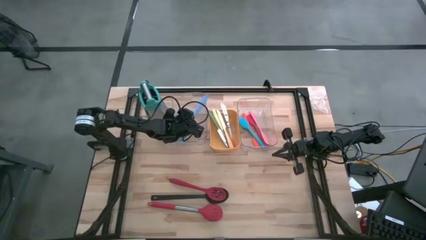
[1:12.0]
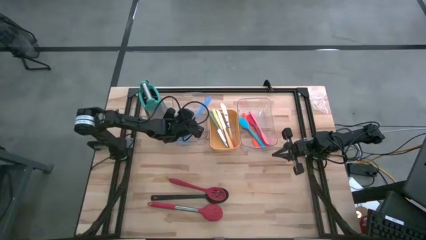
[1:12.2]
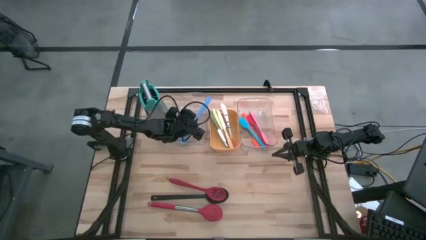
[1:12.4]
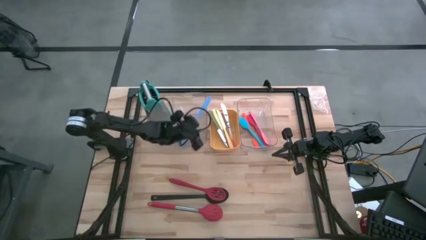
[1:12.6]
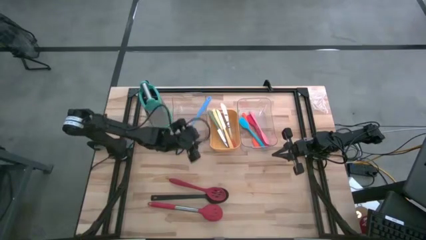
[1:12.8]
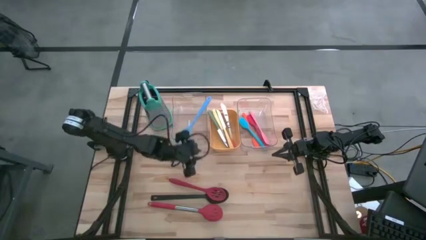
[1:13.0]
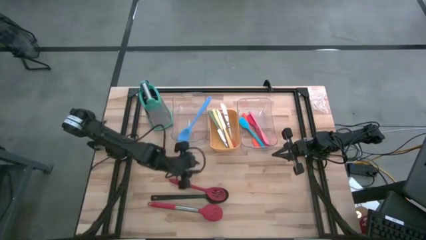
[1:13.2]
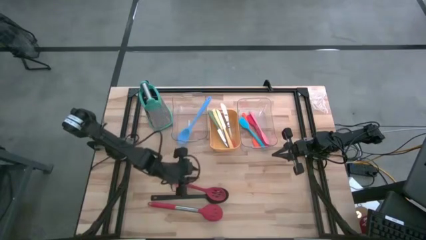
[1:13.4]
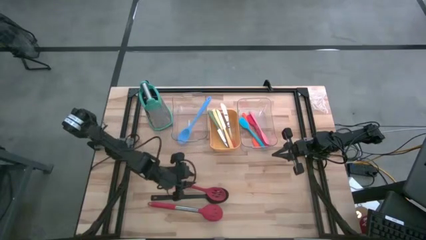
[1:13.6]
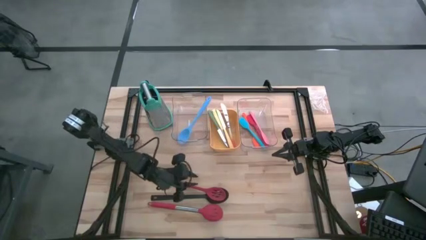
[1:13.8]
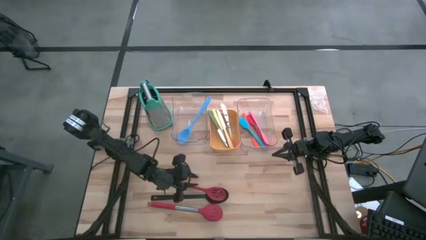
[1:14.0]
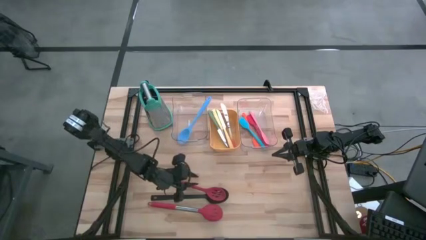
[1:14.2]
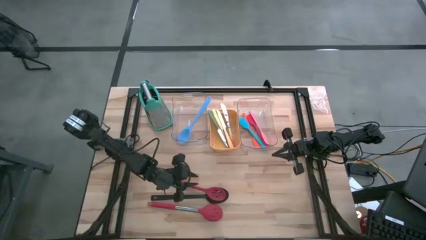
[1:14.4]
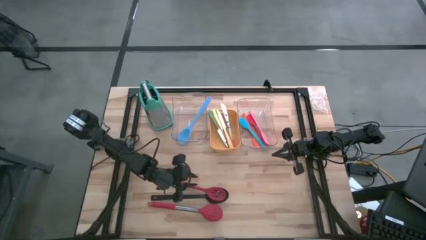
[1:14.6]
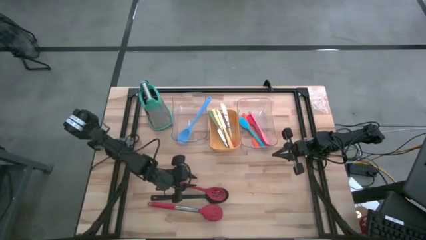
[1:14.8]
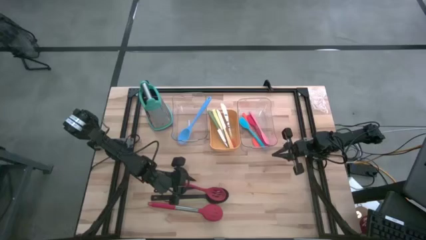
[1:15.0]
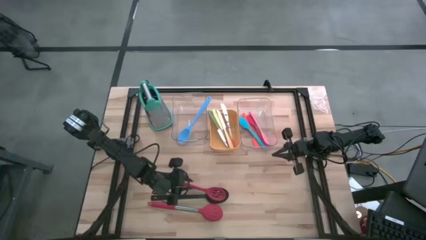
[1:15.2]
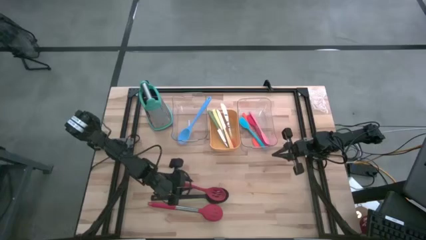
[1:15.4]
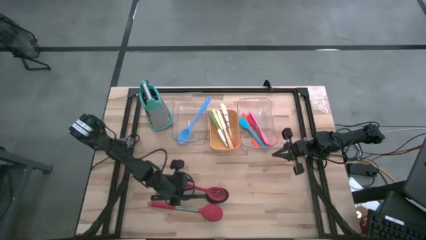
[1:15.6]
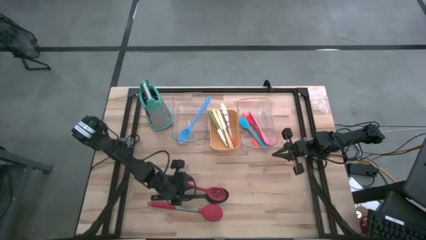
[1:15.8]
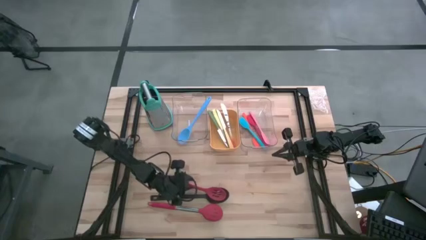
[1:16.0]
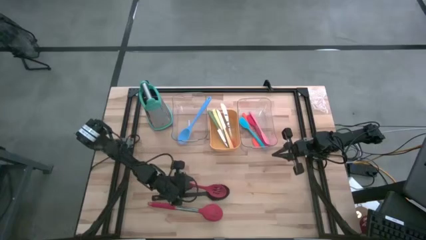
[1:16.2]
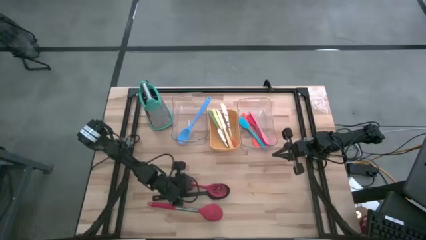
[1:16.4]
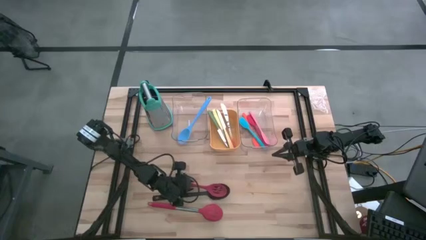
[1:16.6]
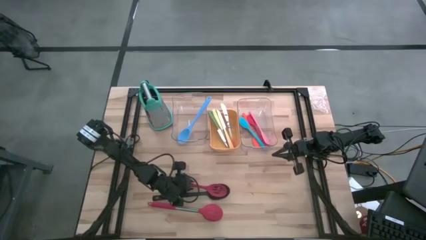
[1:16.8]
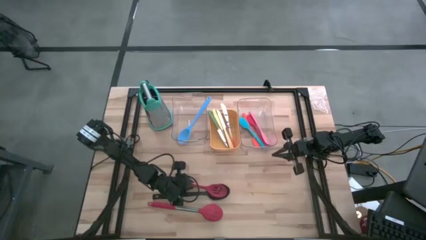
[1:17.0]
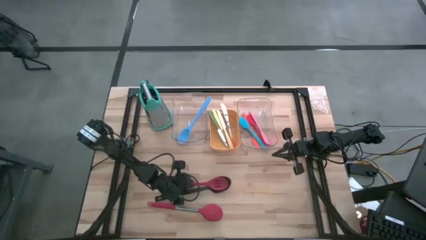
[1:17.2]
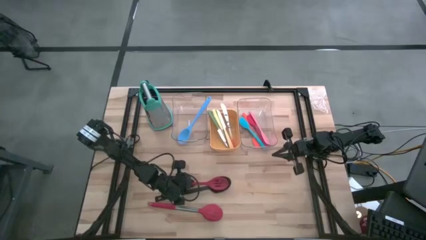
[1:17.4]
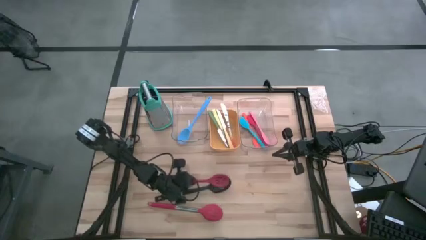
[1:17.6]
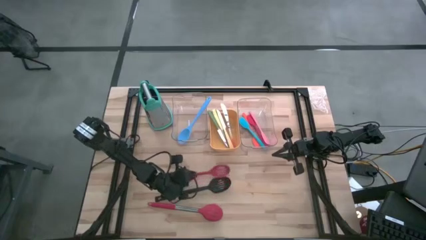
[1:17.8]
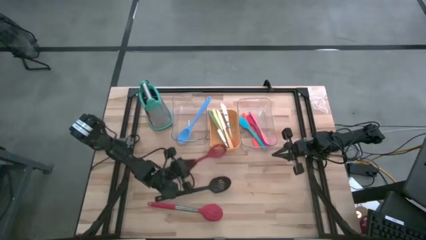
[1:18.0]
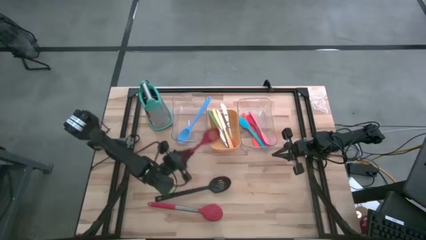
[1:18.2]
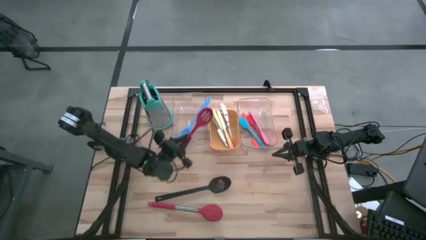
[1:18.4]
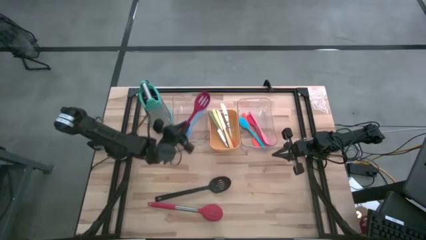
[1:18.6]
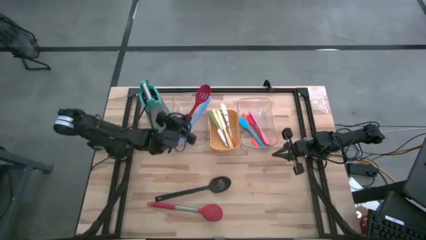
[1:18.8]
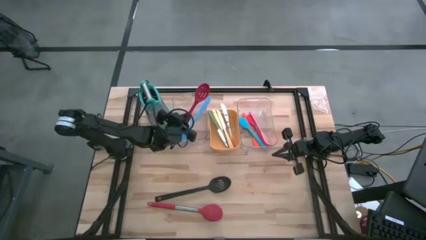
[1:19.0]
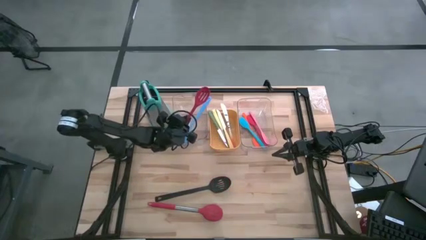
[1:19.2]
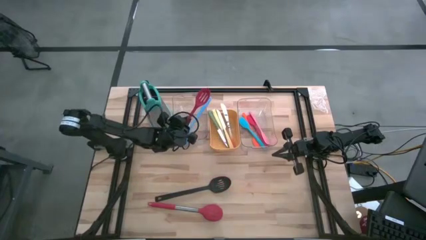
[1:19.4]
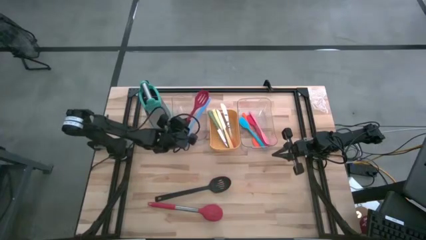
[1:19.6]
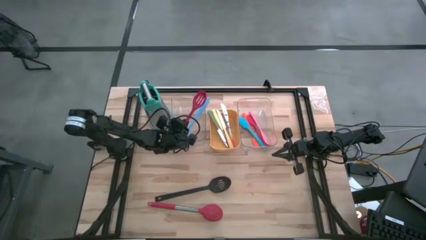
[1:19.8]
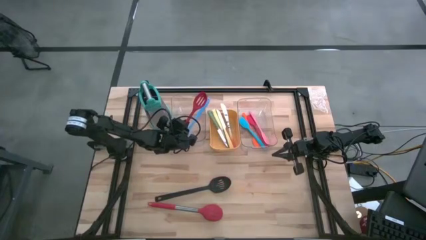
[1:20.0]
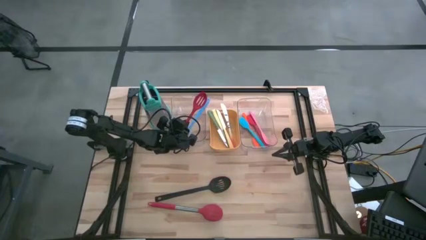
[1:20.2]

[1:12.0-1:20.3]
Task: Pick & Place Kitchen Items
Put the red serving spoon into the left transparent bin

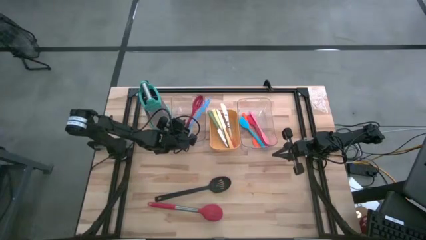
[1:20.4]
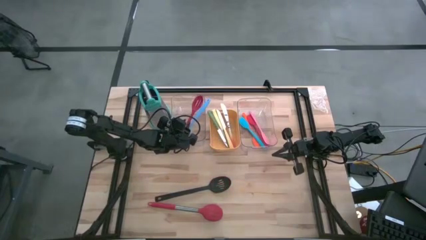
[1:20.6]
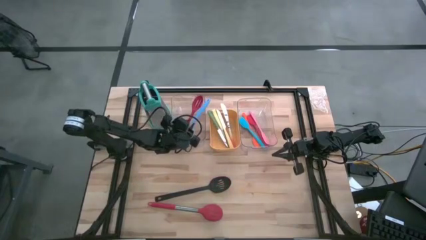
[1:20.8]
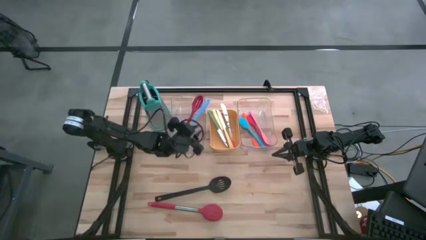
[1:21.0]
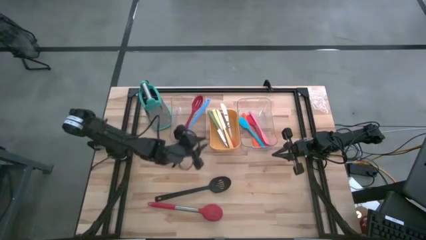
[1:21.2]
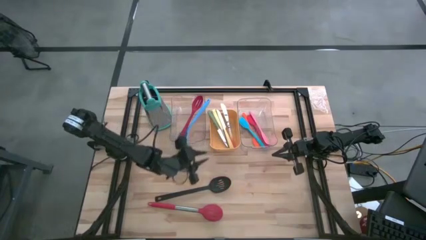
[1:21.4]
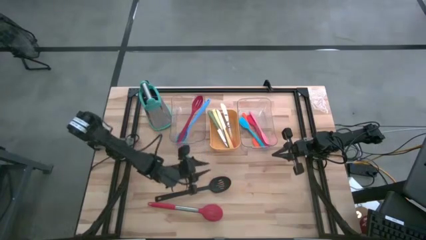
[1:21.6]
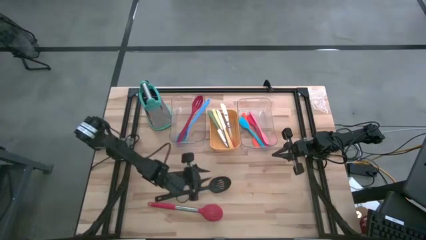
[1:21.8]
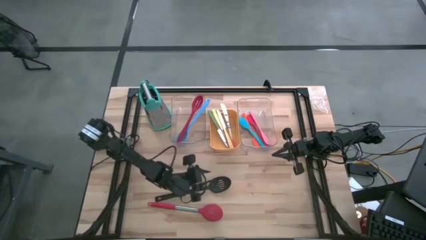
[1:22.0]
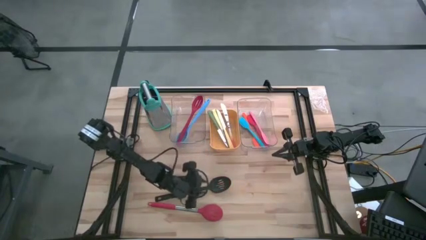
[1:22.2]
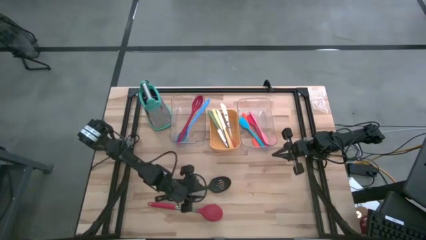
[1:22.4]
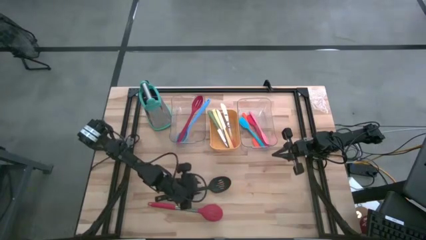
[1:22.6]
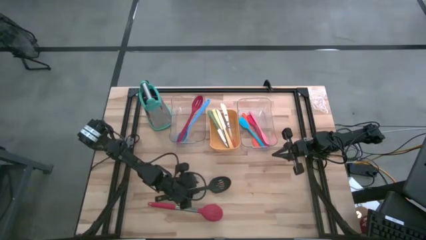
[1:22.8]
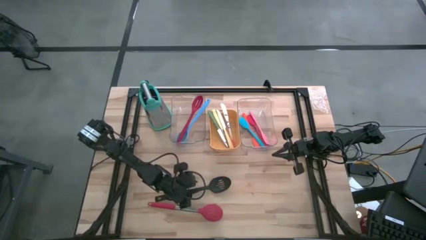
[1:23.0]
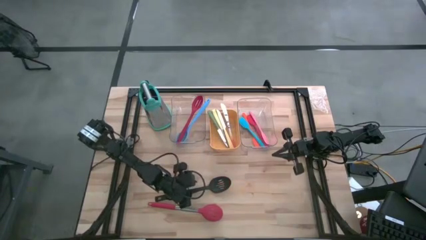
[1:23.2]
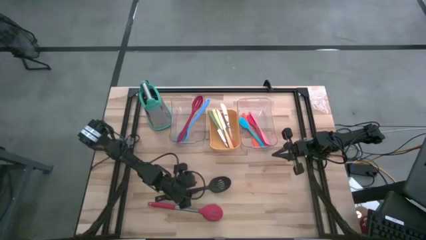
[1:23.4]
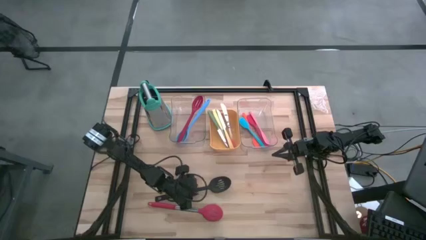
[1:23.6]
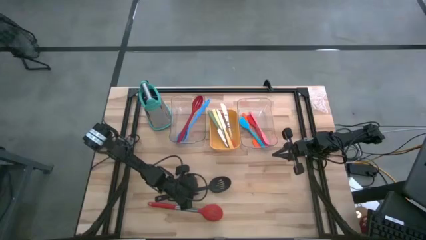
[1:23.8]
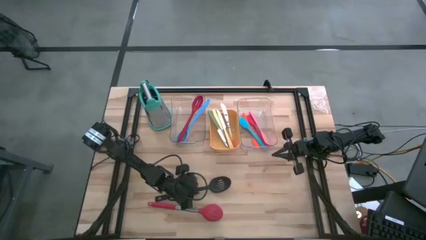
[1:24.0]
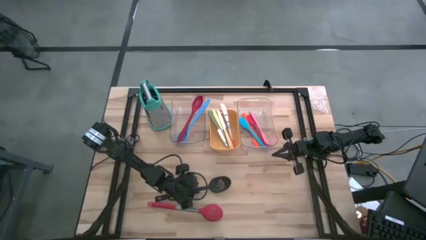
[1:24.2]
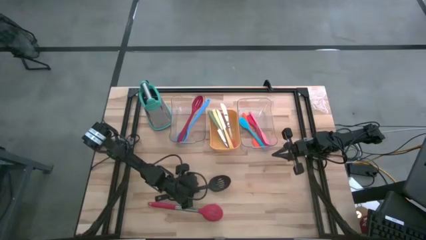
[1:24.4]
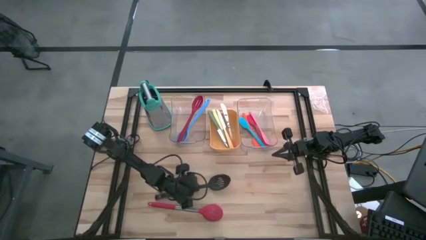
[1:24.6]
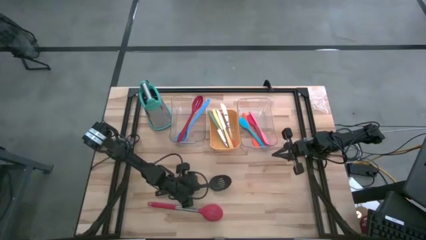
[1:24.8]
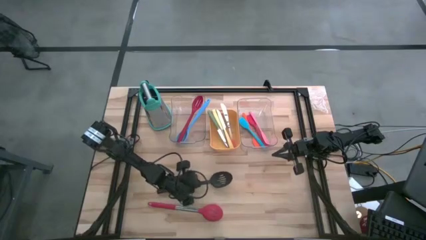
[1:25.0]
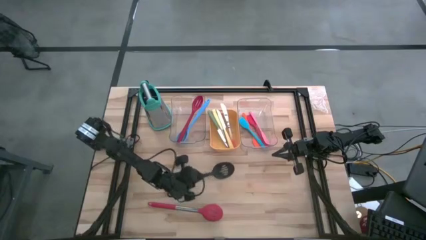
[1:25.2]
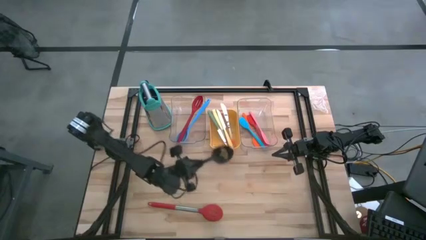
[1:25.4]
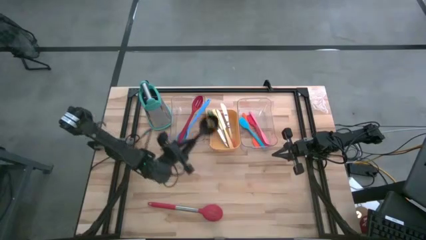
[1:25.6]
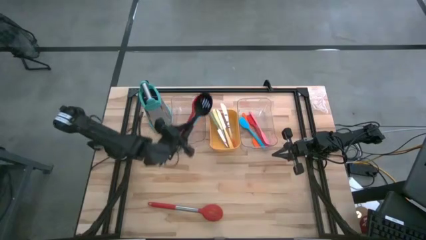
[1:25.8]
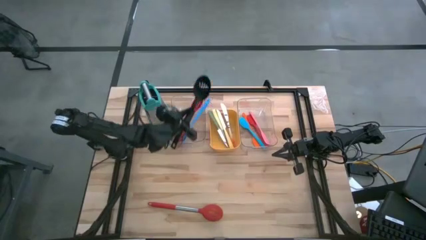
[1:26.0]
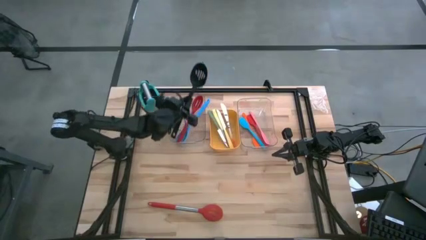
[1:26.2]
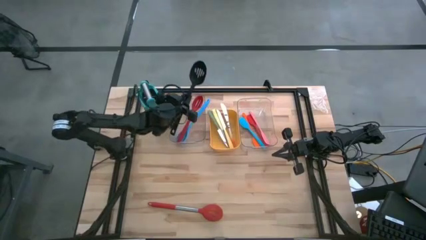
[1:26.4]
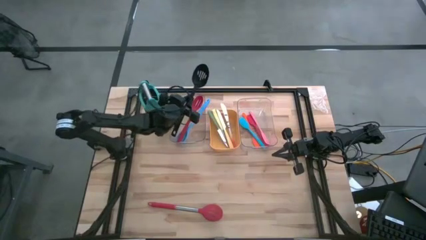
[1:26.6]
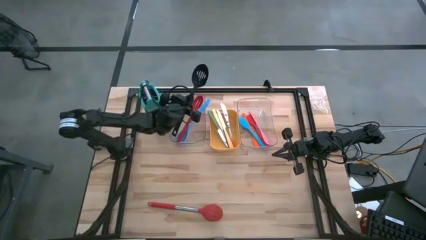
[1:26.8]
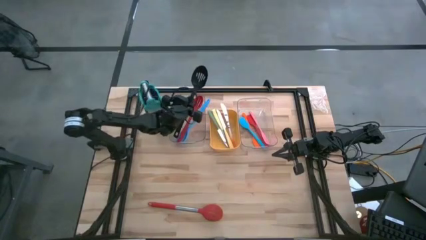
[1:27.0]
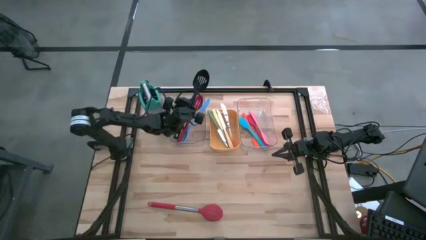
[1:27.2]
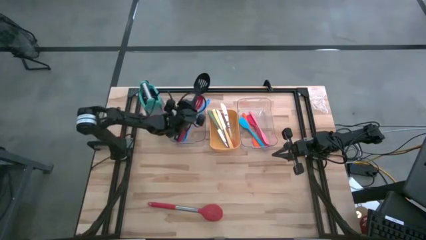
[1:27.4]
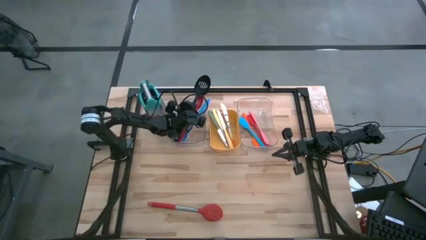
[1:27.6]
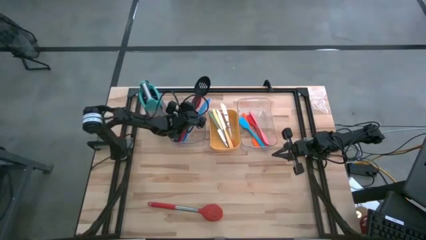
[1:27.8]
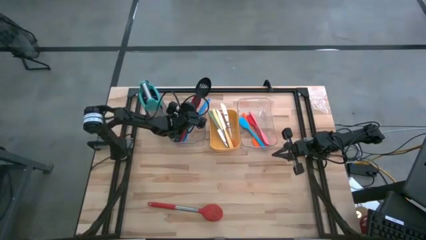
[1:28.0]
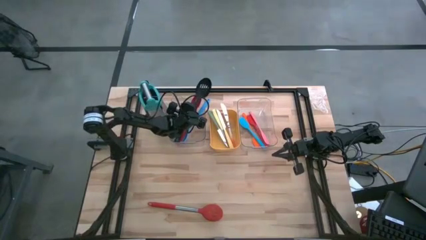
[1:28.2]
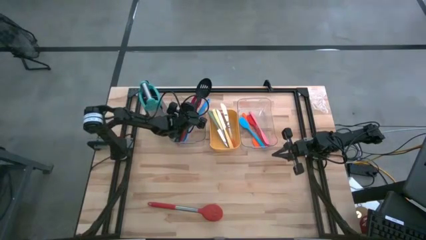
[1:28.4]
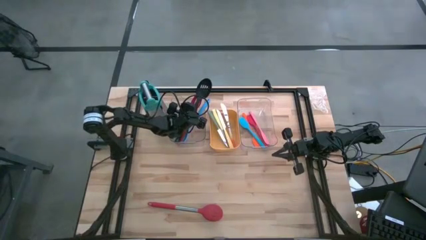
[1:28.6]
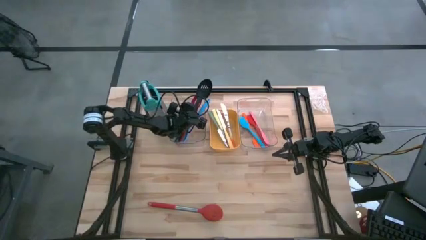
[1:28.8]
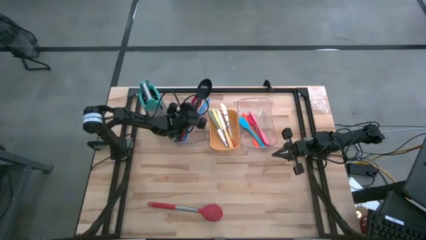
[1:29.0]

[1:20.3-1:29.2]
Put the black serving spoon into the left transparent bin
